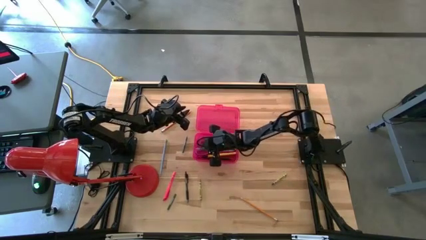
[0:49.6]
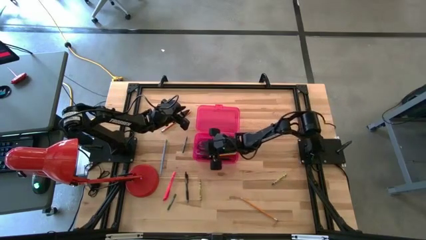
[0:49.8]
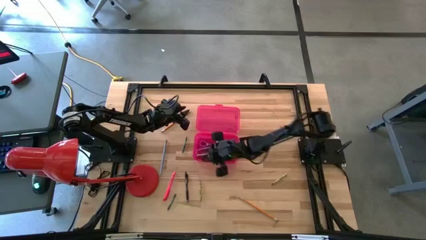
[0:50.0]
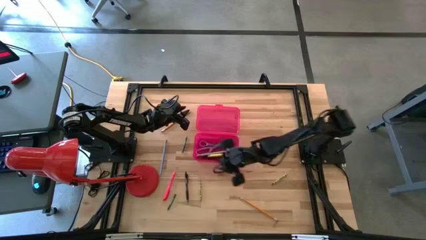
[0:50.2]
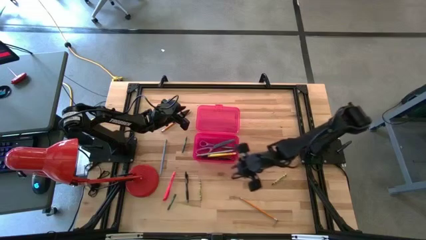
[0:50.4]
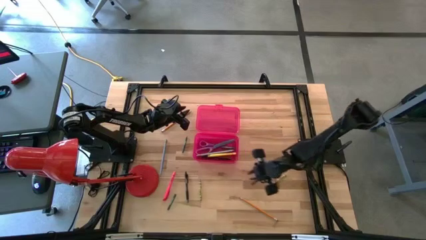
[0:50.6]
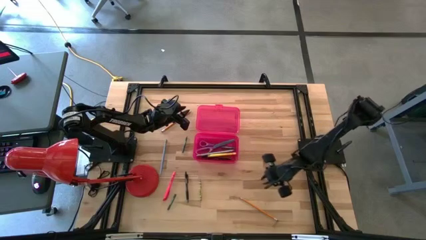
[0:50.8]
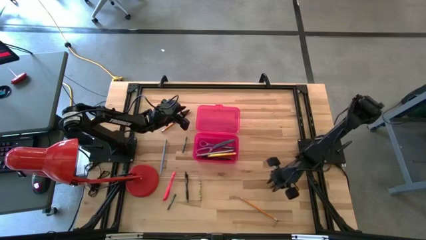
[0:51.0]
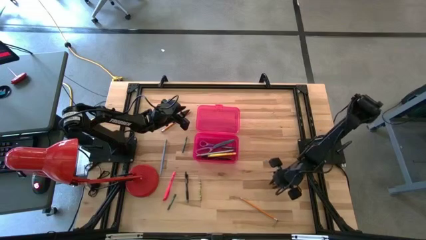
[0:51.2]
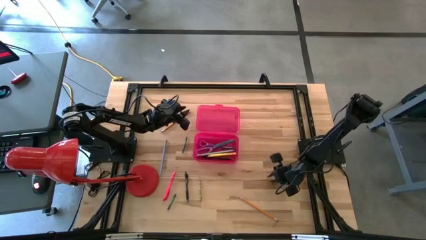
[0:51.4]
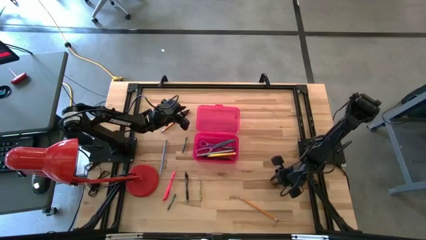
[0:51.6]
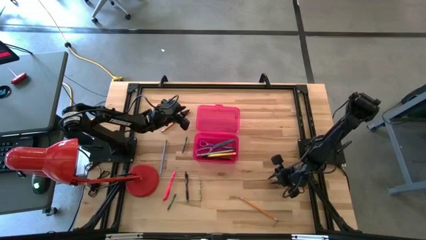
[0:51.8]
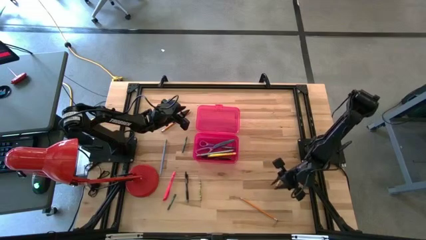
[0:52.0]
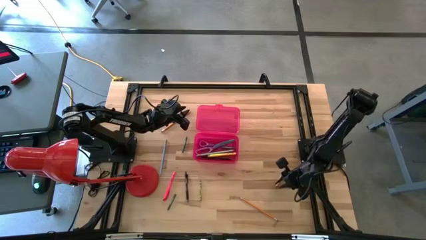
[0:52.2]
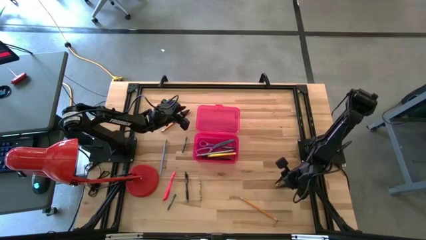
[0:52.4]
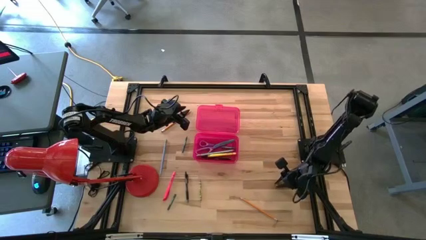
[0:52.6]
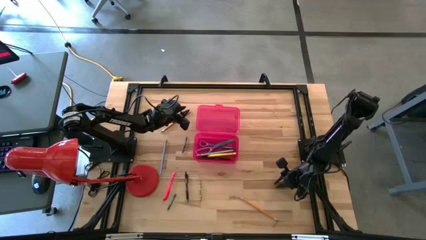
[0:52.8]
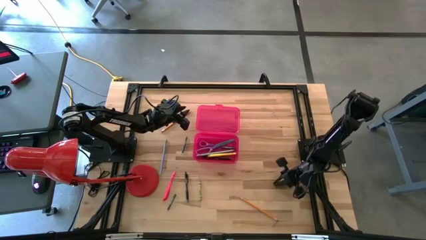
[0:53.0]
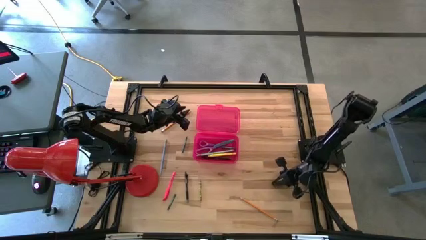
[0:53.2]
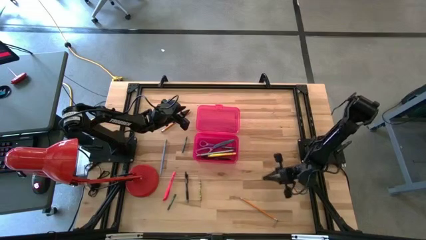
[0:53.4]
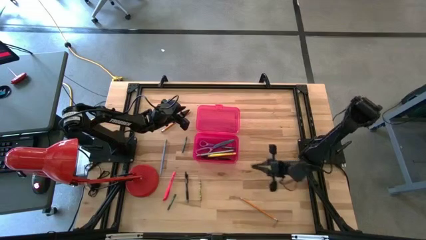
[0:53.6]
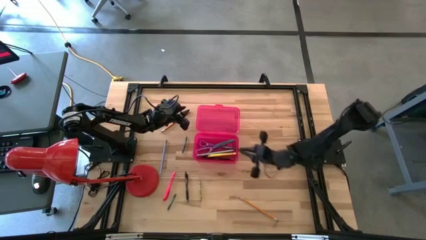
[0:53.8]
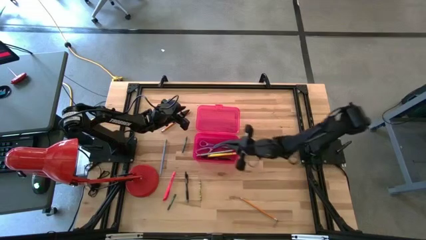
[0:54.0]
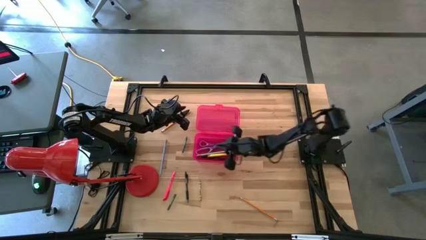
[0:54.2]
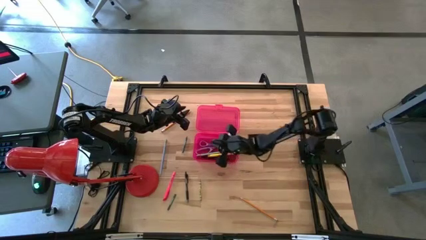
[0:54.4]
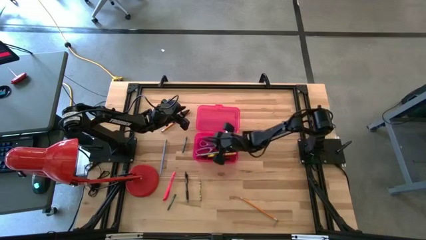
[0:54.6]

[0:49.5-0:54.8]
Task: Pick & place school supplies into a supply box
Put the right green crayon into the pink supply box

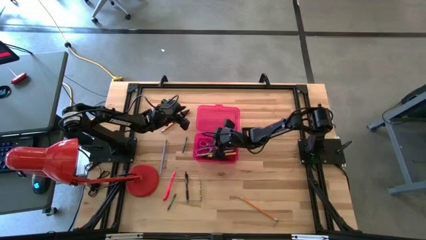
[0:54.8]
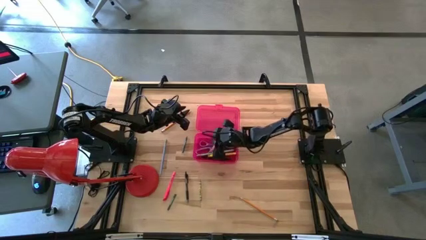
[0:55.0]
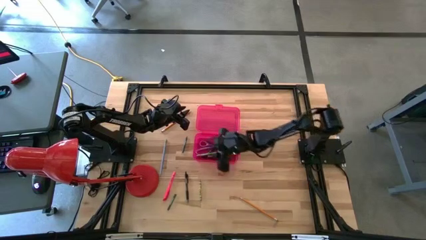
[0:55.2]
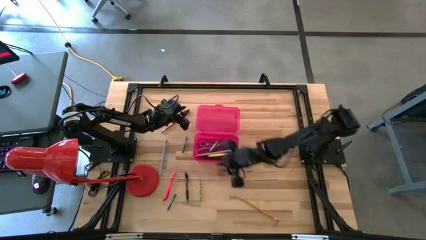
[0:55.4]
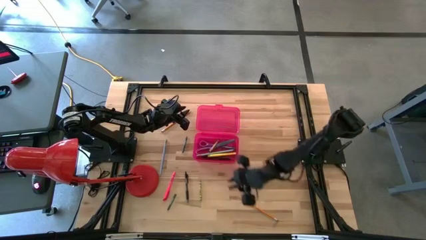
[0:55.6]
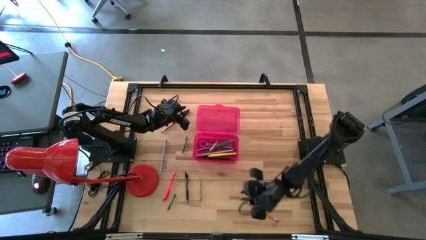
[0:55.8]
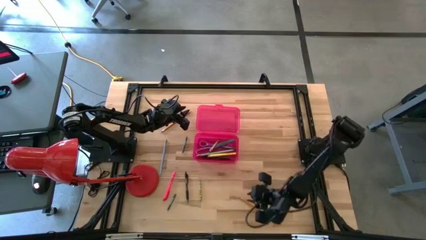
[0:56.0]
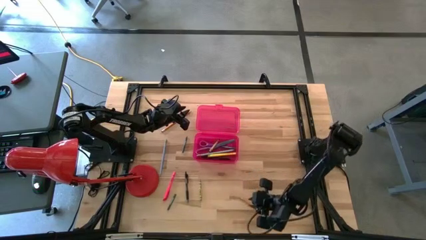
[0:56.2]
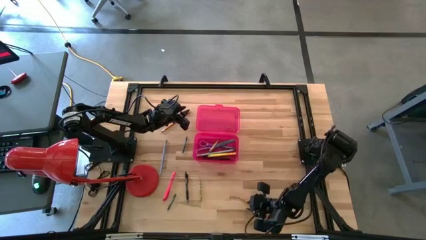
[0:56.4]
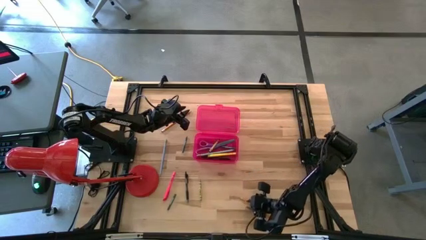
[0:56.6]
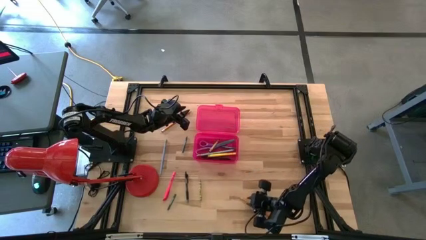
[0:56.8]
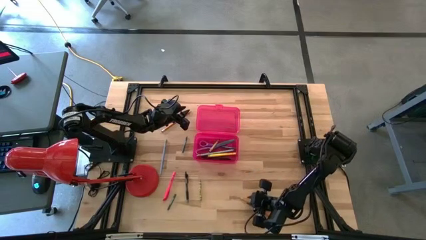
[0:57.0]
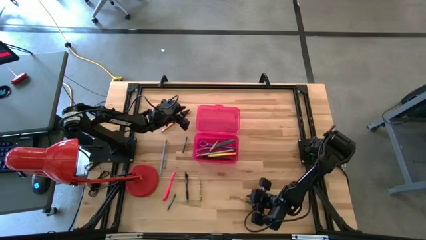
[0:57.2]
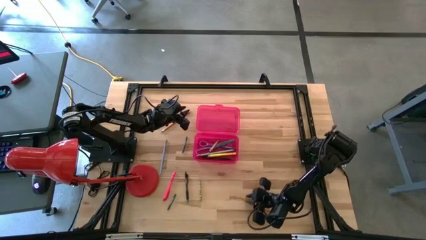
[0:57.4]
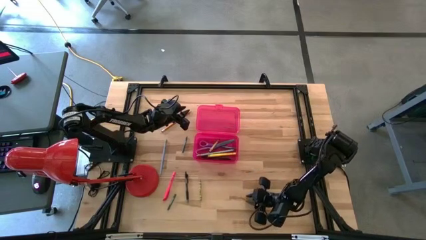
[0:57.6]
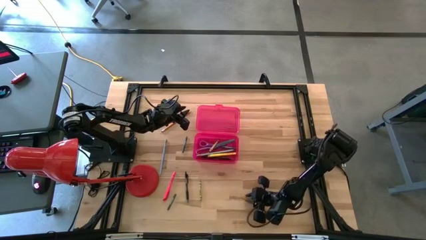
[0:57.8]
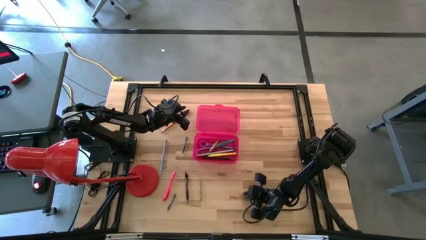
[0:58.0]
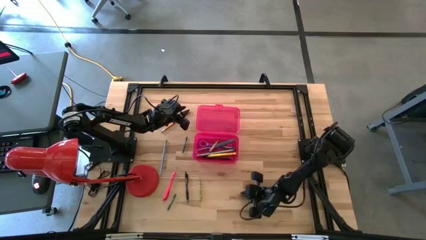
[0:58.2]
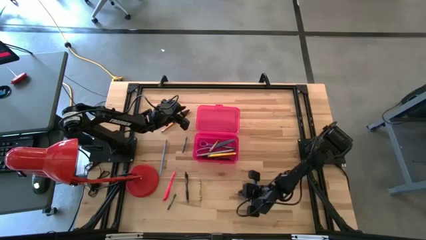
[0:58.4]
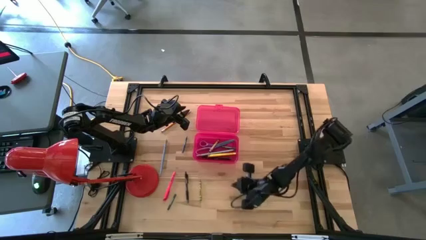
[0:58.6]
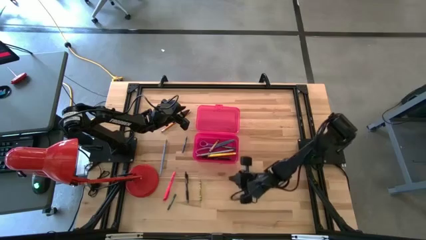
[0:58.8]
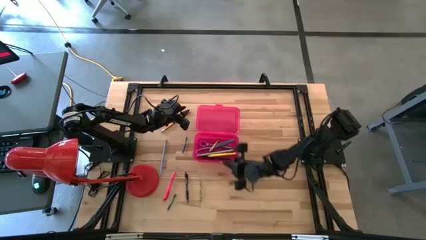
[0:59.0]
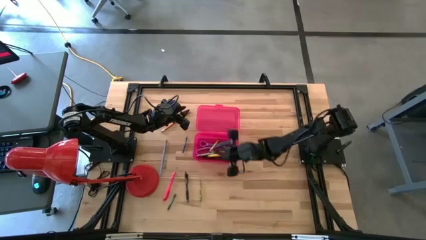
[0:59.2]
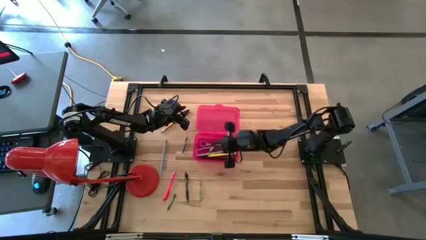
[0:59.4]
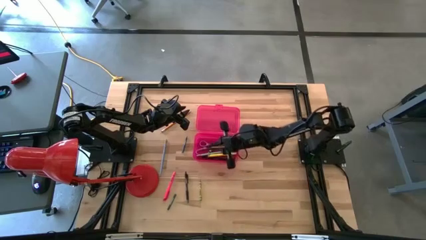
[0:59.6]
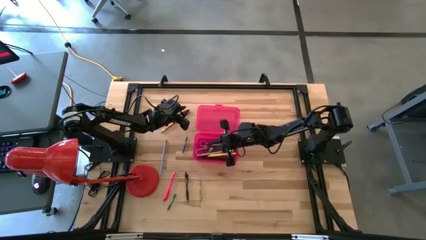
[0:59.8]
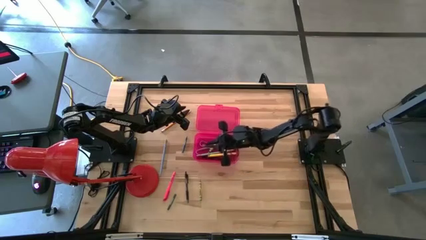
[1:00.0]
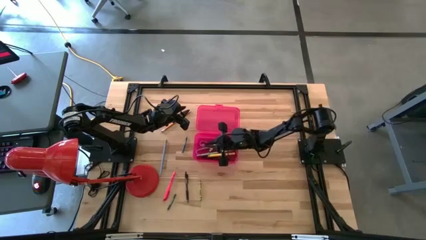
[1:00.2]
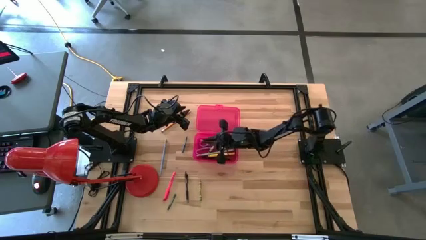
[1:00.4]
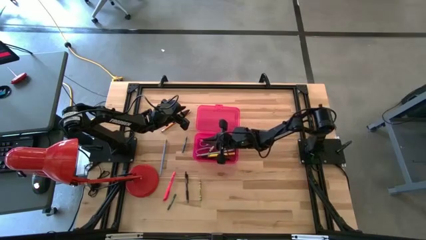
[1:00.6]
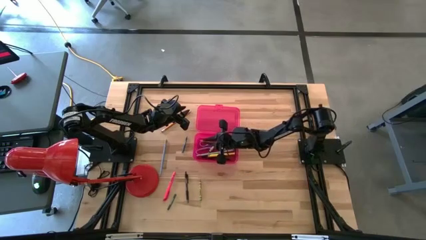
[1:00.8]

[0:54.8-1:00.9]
Put the bottom orange pencil into the pink supply box

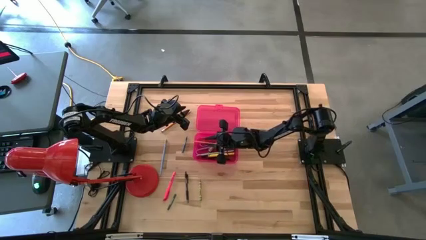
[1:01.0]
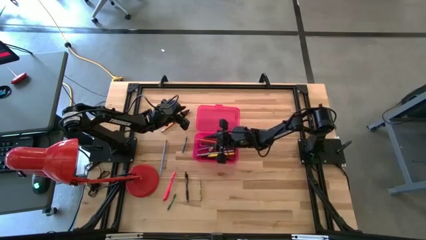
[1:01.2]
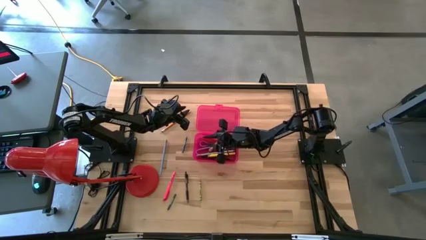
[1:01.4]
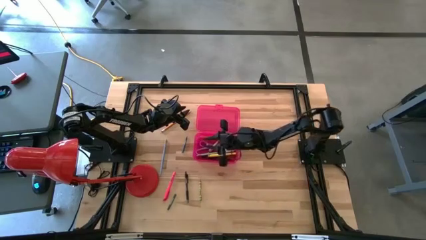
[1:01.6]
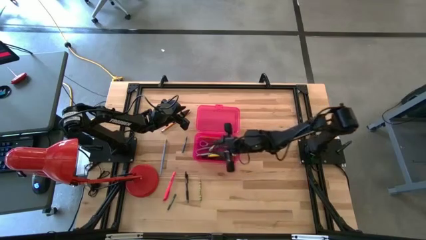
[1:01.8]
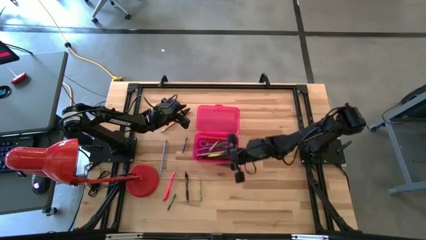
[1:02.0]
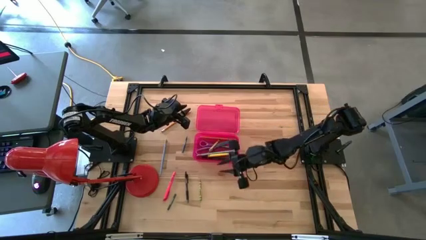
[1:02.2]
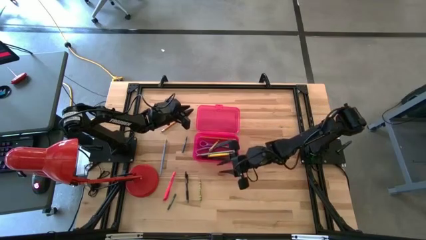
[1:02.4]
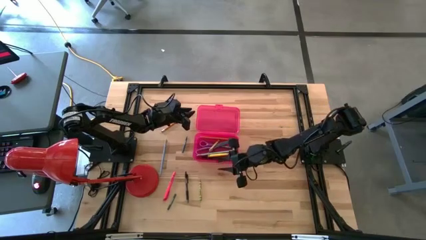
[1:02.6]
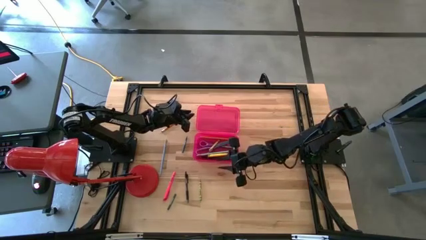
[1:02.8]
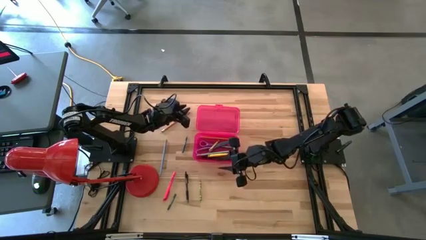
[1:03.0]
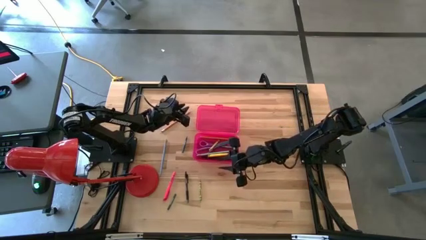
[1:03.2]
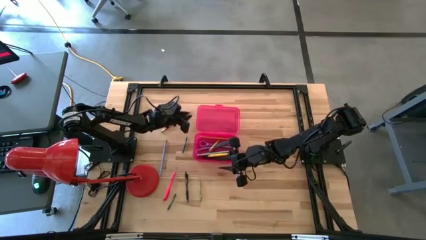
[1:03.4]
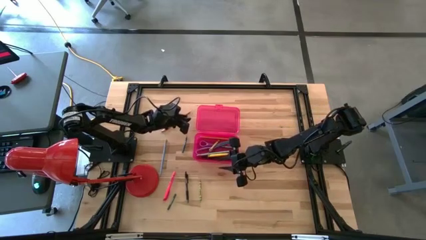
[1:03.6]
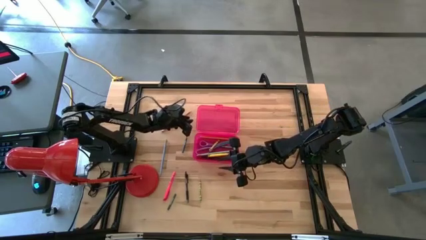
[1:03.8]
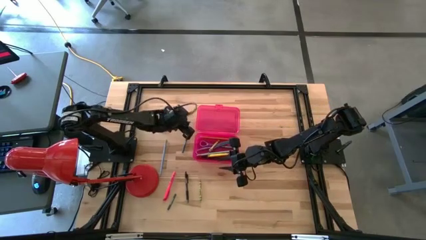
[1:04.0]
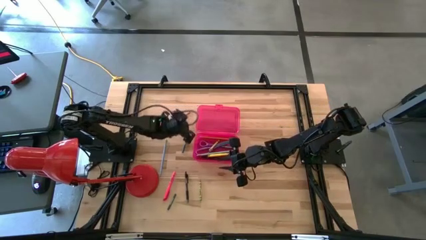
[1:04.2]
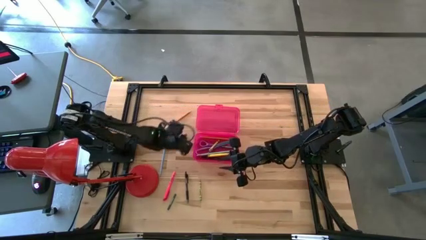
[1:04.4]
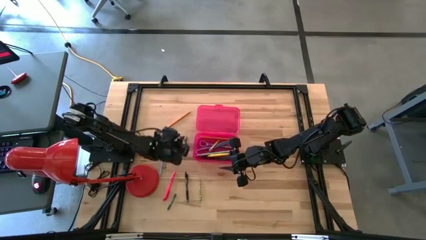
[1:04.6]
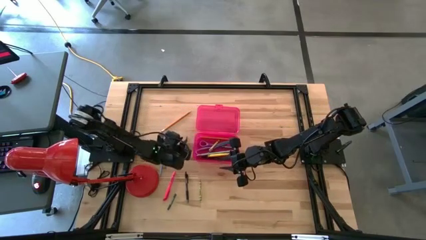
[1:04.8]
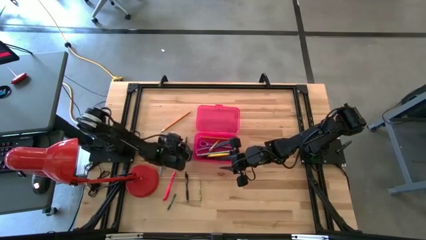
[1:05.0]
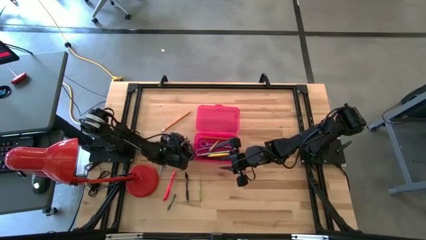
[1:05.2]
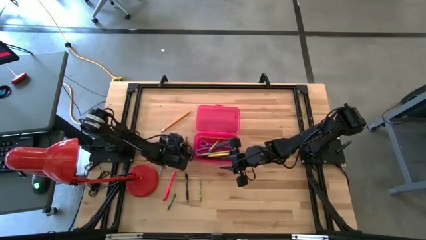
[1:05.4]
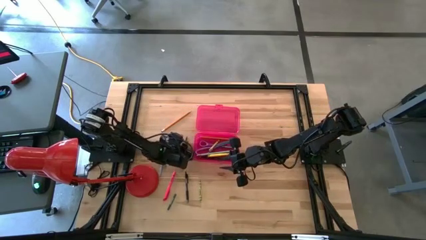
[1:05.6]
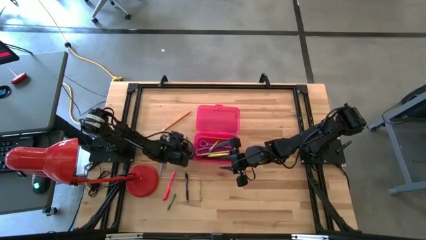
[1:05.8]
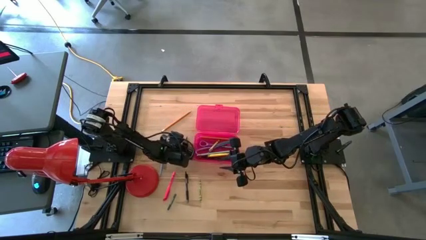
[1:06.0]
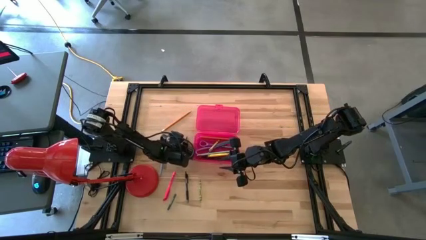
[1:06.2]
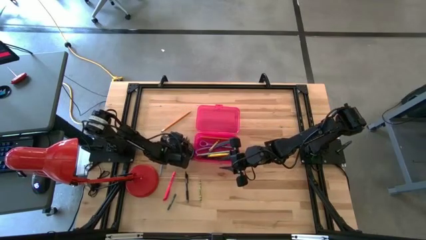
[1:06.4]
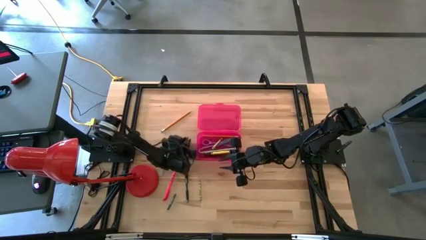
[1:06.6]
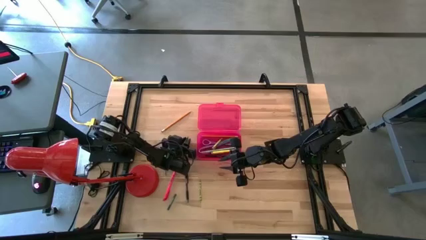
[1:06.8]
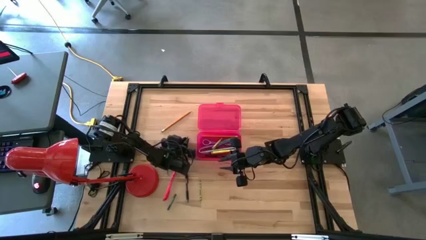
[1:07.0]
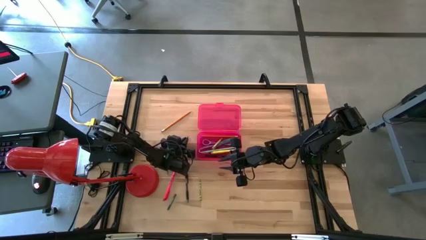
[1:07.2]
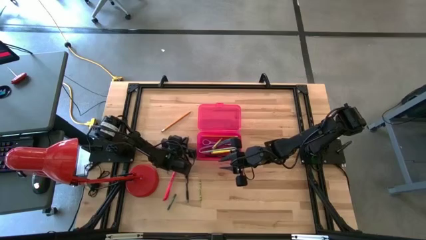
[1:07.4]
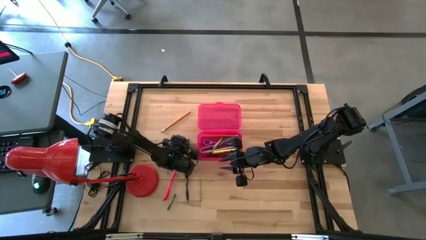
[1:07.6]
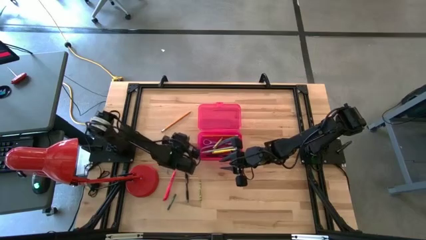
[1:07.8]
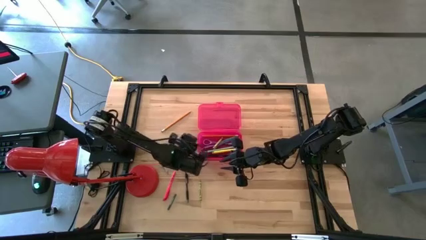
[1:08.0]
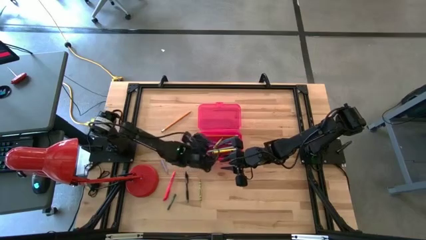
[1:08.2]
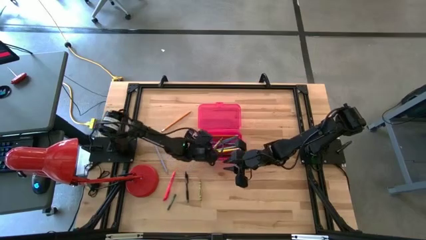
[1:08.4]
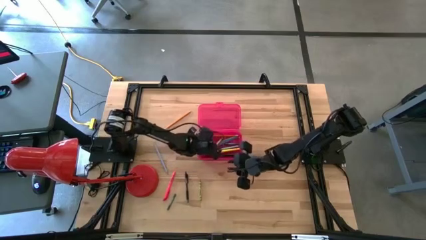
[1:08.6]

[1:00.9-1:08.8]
Put the top dark green crayon into the pink supply box
